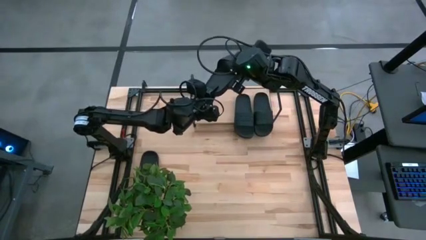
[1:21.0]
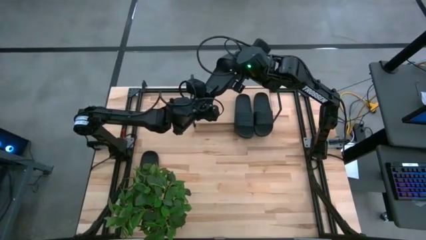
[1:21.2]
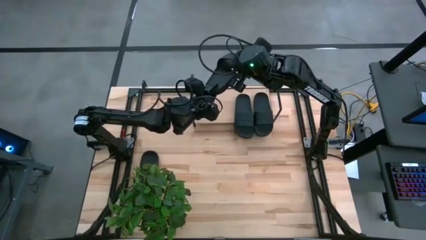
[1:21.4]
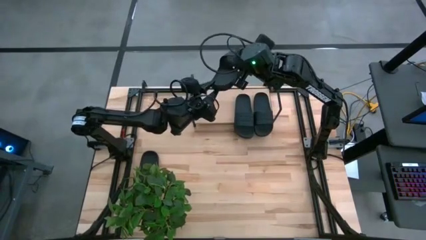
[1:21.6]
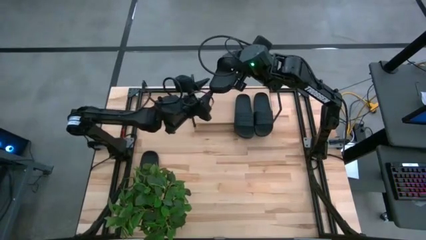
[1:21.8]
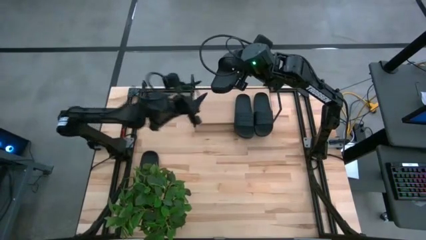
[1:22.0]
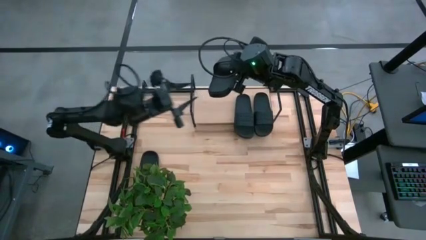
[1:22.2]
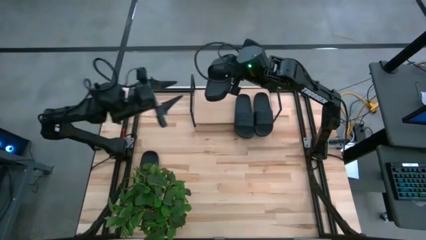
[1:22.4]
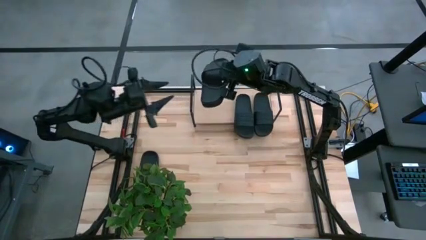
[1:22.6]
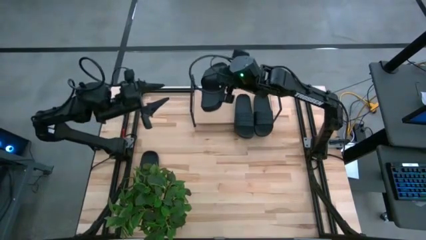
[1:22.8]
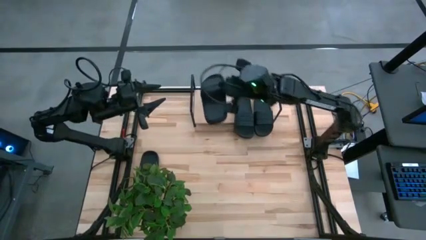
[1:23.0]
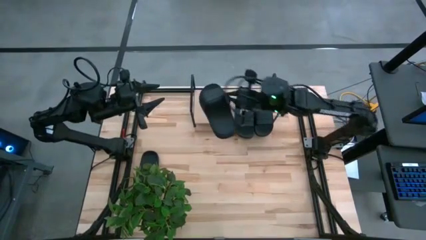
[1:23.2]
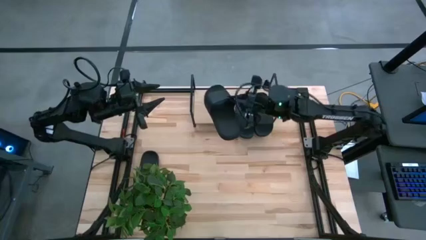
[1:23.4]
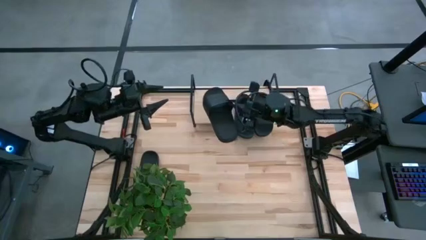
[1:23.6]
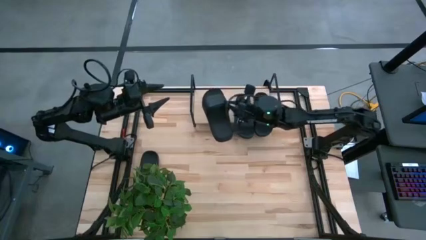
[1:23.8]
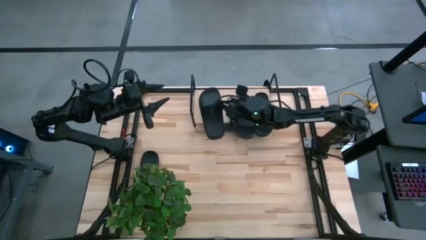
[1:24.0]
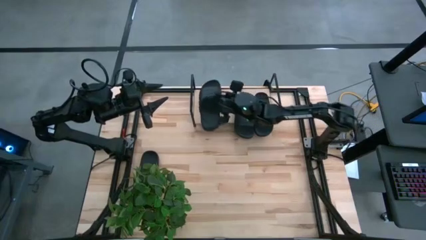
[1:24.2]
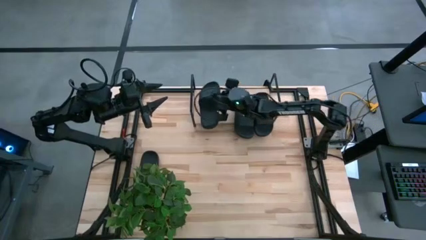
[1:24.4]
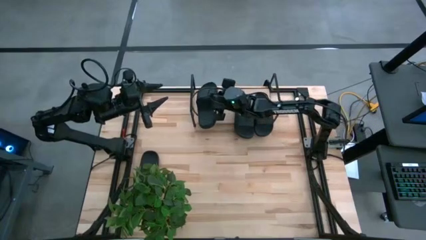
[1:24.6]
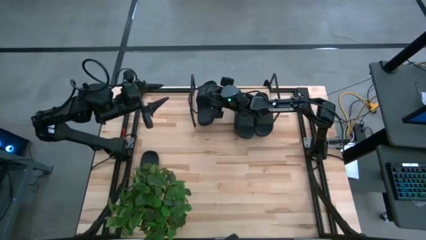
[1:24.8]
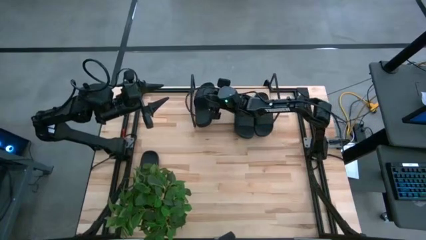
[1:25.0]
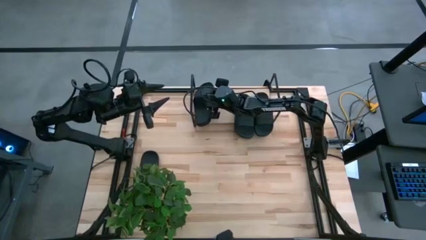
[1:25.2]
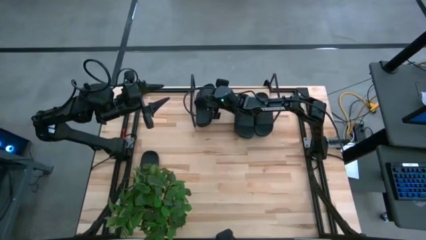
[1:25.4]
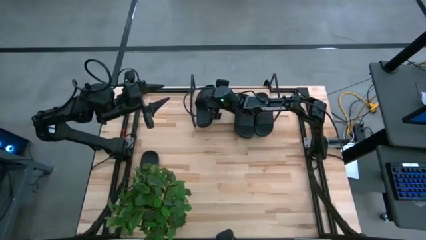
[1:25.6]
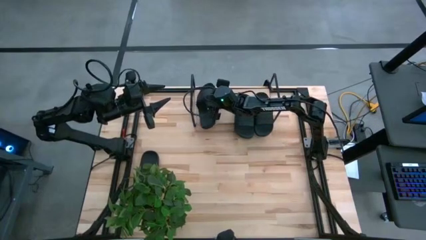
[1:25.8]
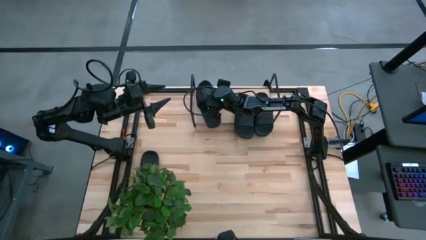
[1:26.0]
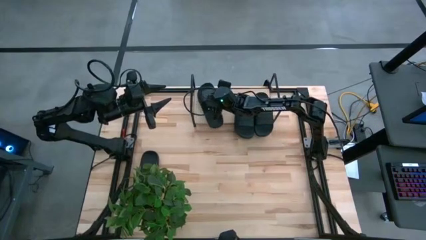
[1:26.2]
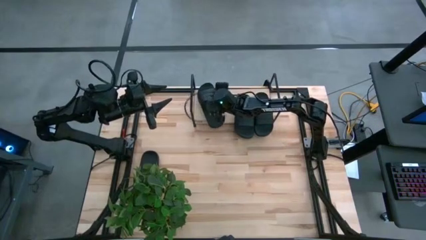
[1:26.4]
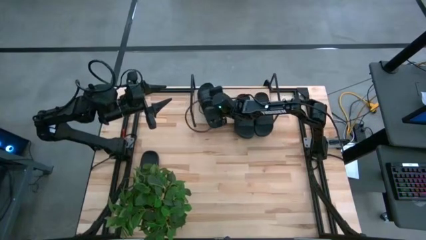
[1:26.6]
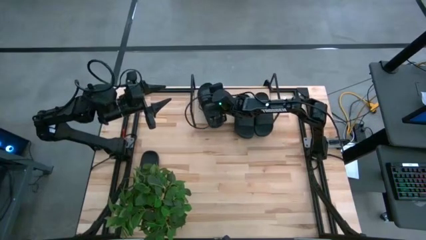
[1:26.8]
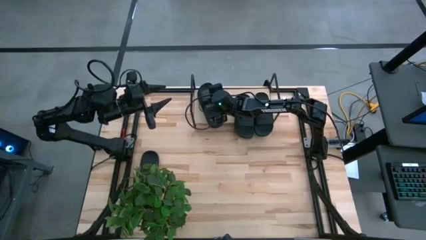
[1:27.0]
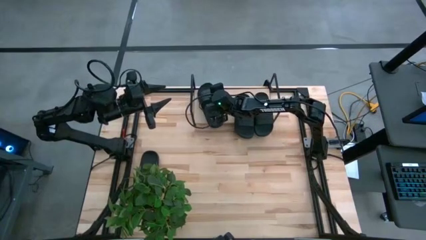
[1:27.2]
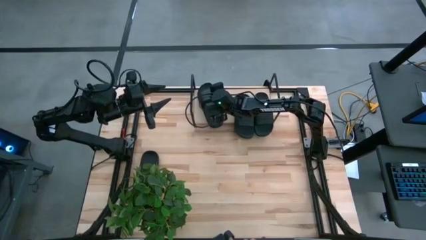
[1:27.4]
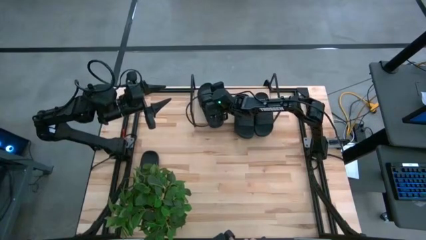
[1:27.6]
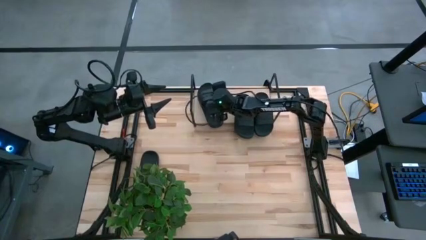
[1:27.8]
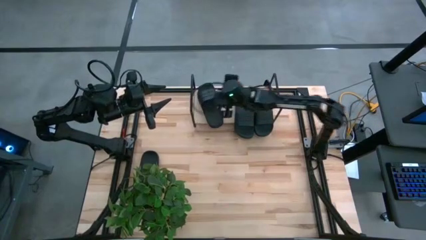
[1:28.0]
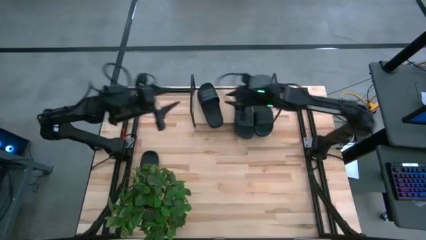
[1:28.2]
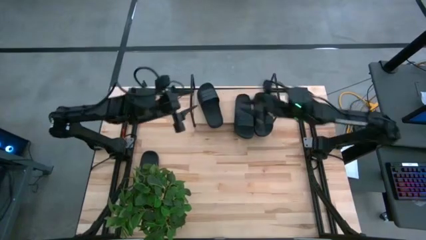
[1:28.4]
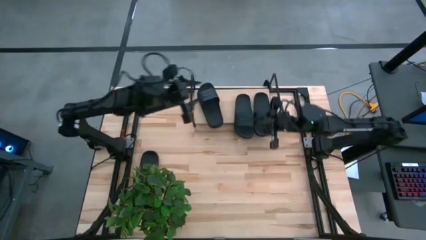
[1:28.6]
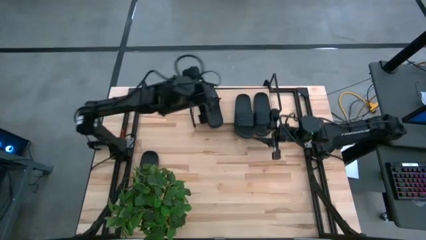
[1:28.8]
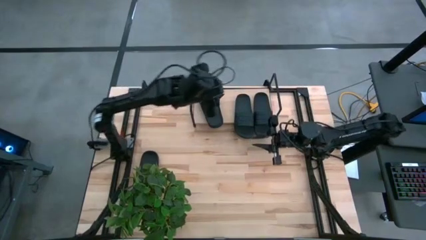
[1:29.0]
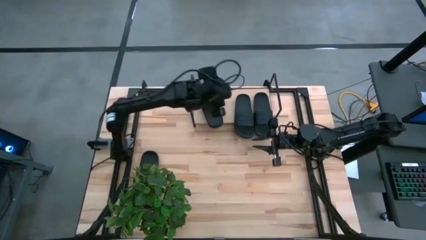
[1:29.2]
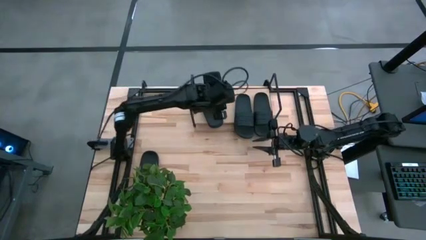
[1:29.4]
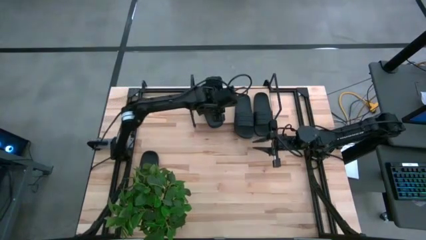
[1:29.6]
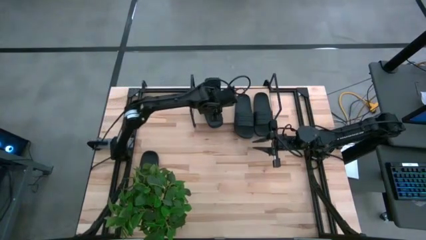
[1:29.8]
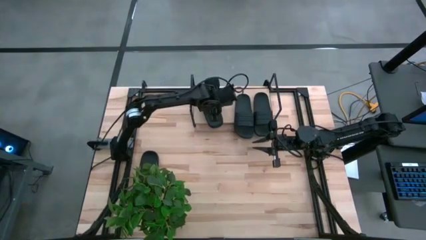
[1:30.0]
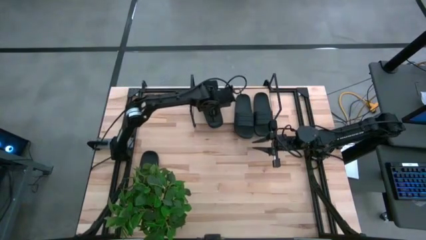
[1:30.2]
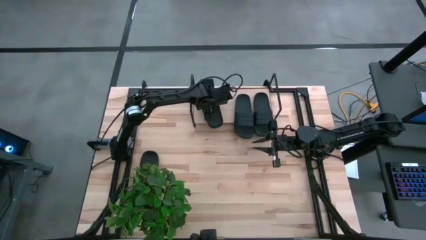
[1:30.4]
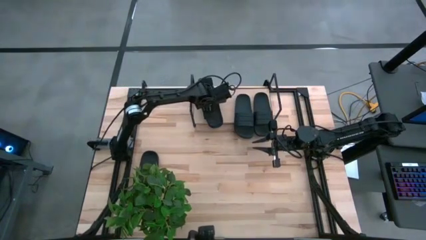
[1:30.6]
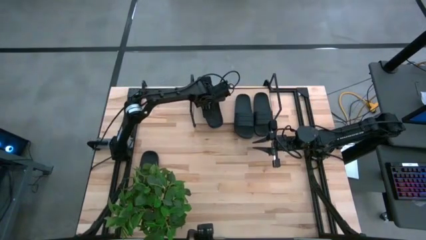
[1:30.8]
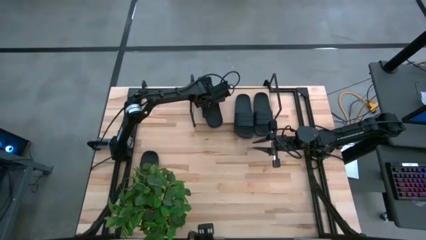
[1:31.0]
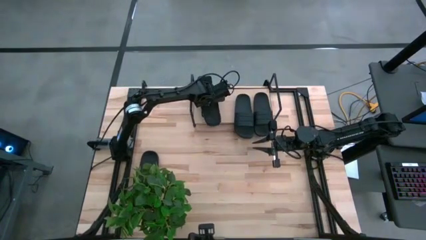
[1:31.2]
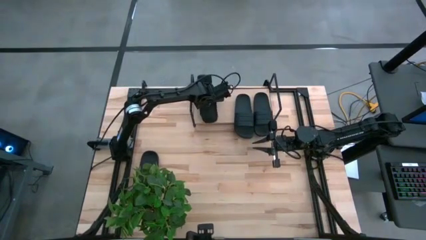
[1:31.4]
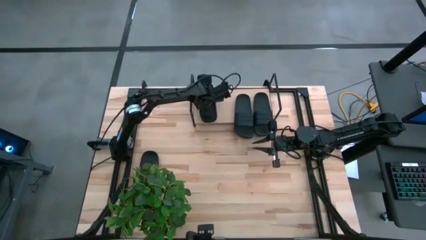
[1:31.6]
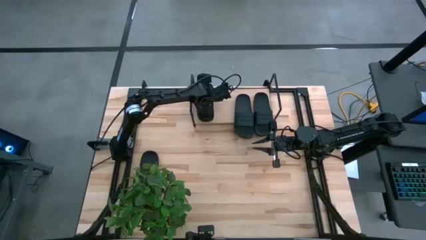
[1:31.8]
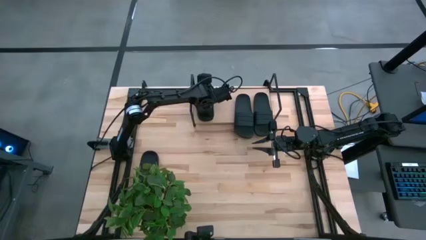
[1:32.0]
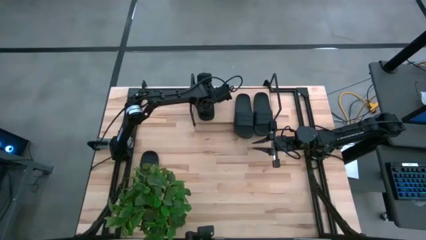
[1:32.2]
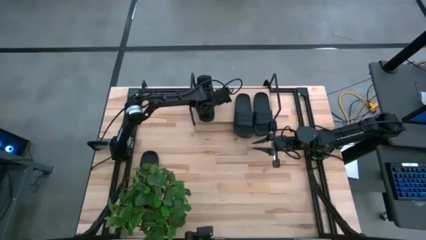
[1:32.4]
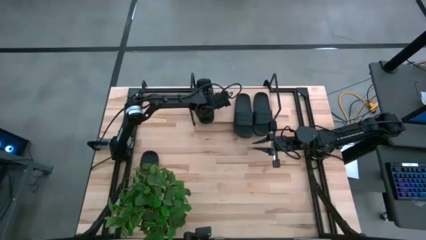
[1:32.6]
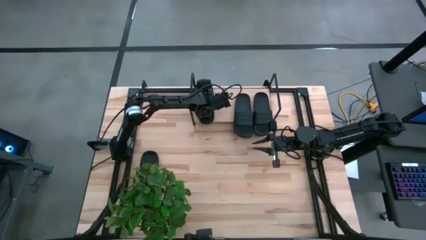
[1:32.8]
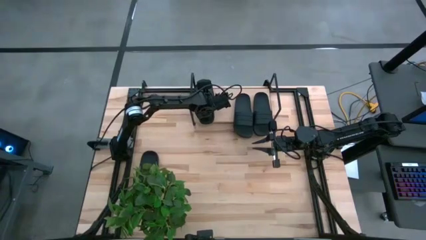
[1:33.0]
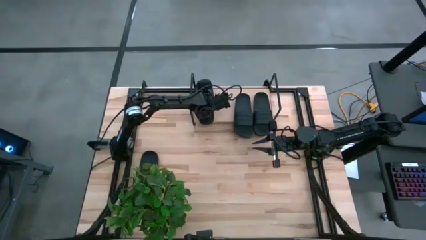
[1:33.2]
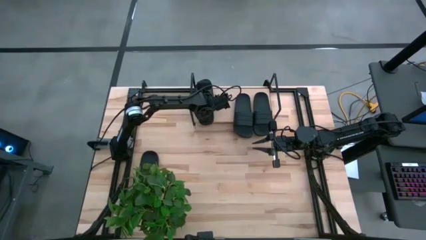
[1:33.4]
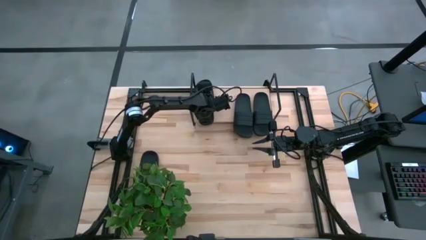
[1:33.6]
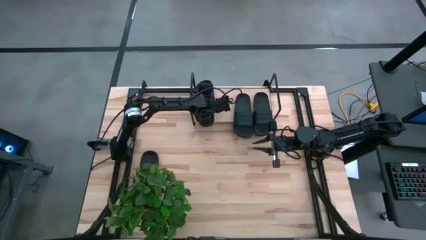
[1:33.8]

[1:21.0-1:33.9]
Task: Pick and place slides into the shelf
Put the black slipper on the shelf

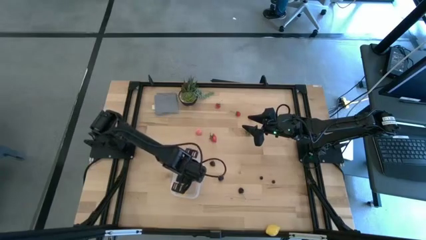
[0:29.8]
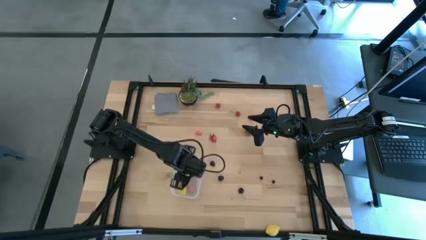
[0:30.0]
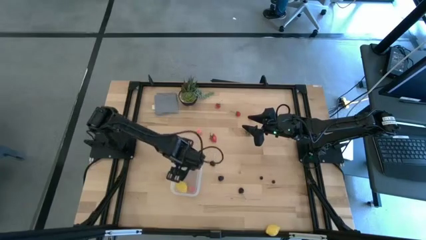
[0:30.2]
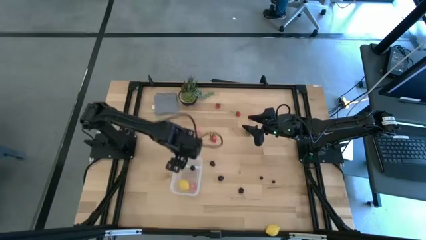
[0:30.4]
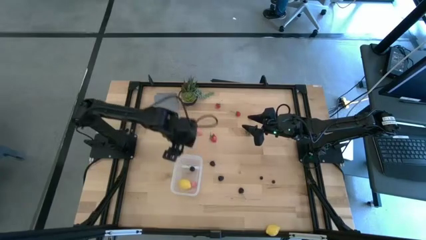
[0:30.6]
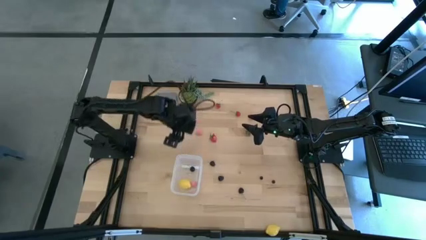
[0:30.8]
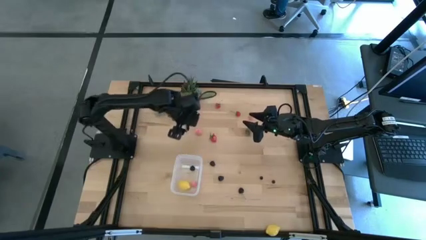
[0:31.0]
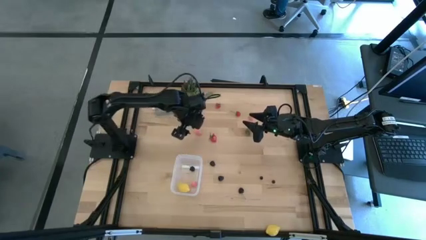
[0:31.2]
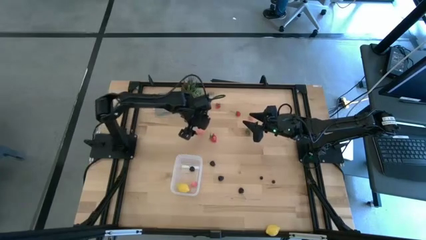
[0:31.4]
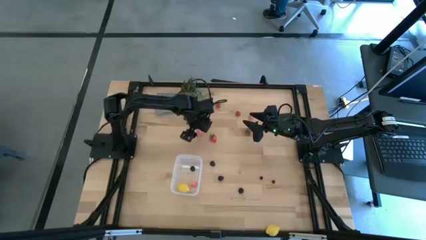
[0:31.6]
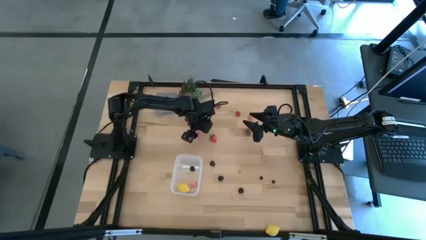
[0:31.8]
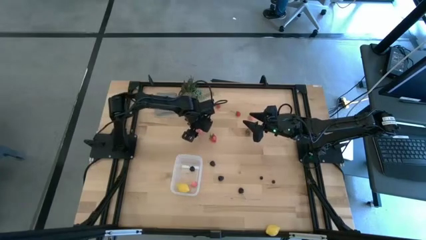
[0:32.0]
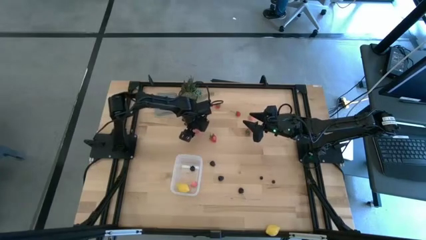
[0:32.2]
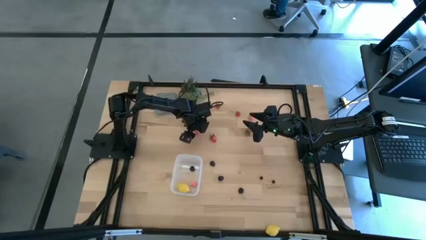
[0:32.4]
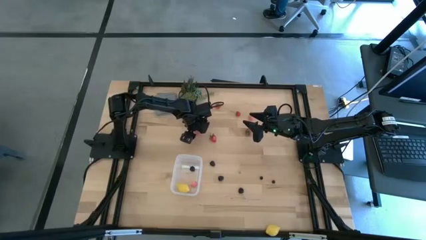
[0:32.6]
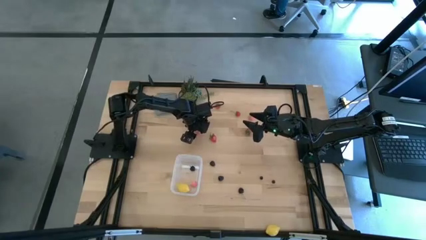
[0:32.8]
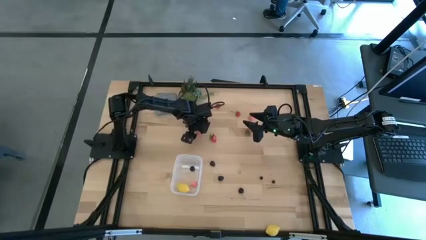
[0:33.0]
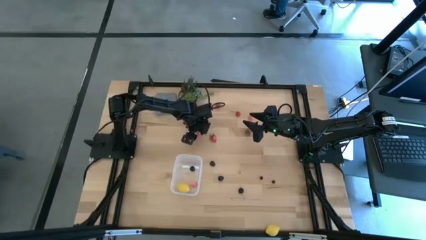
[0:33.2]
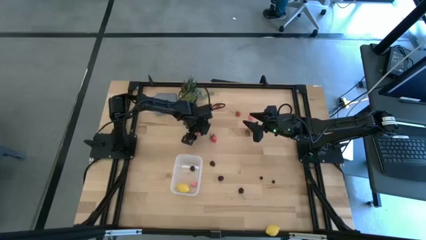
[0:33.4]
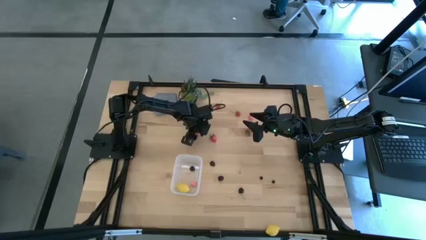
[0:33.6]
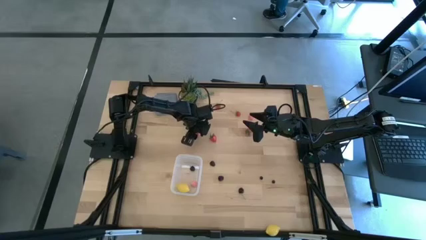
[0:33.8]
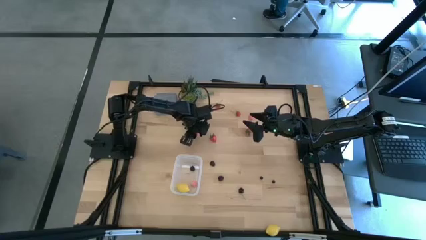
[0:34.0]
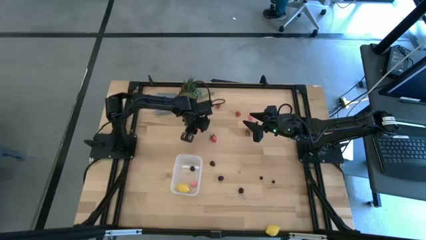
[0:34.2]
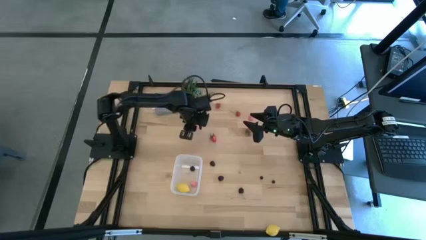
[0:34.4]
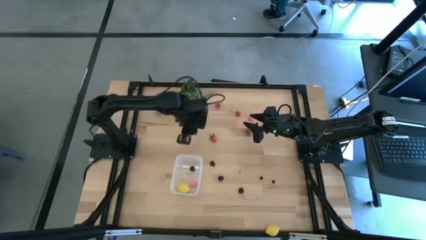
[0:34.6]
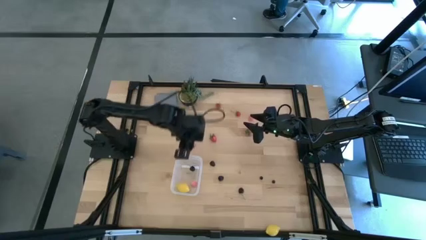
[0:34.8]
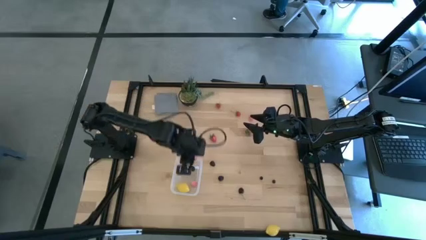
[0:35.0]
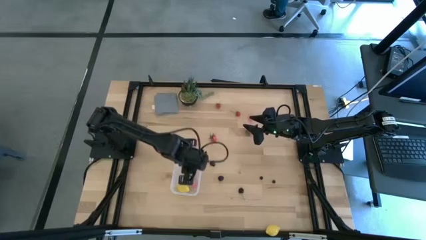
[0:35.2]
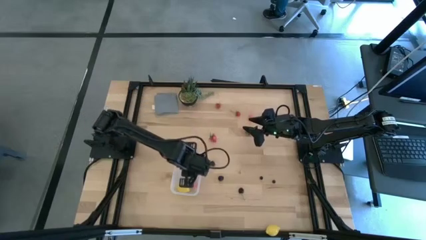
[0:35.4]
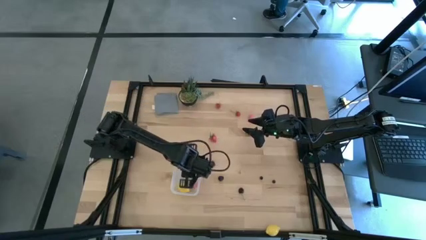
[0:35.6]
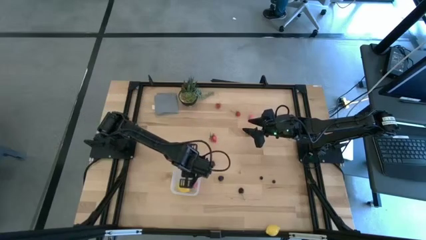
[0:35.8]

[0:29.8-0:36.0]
Task: Pick and placing Produce into tupperware
Put the pink peach into the transparent bin
